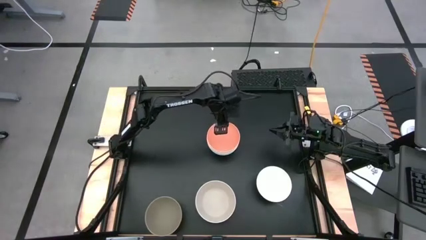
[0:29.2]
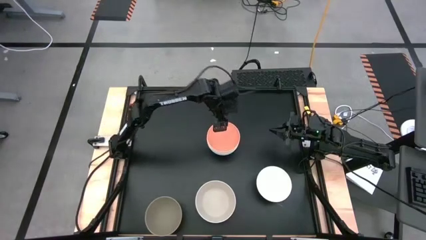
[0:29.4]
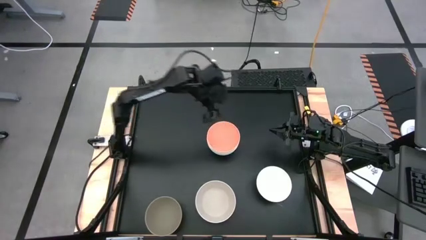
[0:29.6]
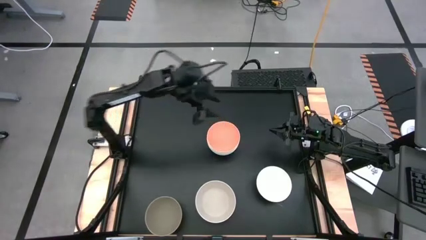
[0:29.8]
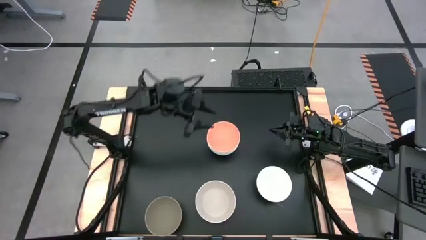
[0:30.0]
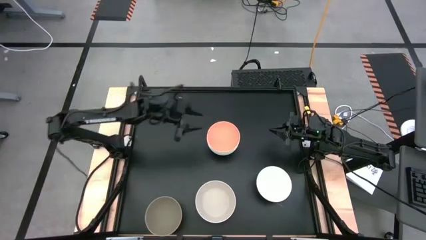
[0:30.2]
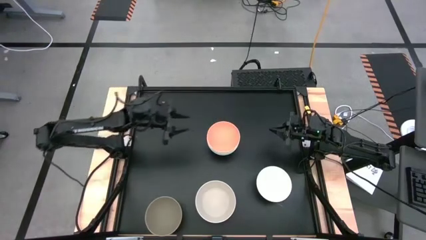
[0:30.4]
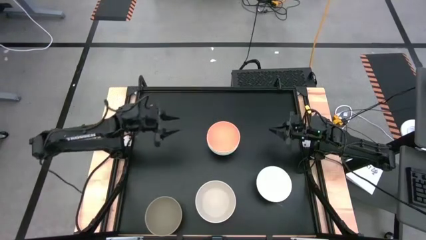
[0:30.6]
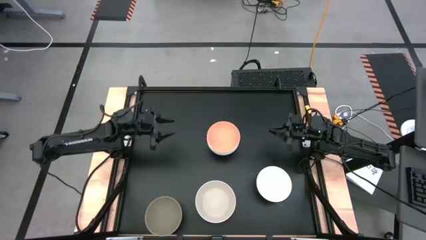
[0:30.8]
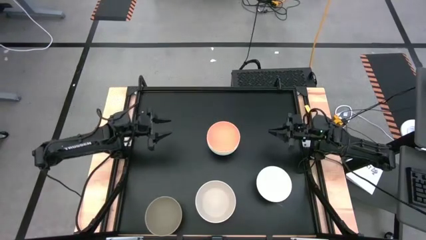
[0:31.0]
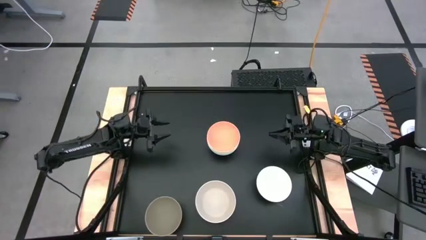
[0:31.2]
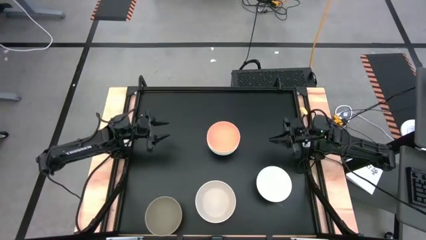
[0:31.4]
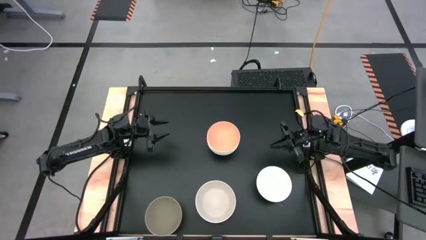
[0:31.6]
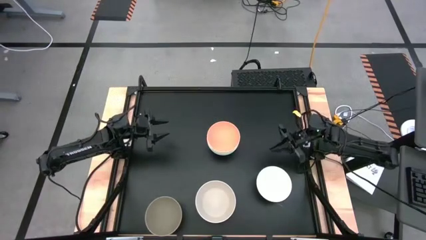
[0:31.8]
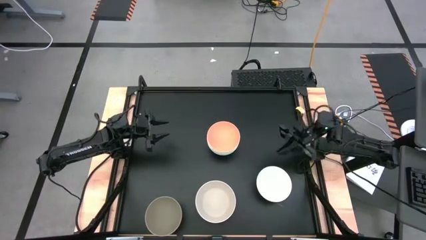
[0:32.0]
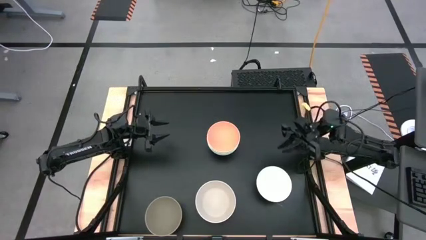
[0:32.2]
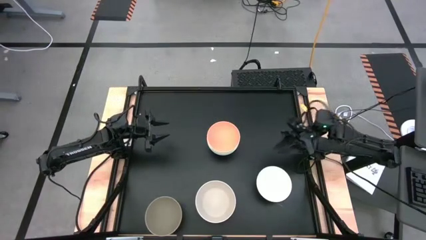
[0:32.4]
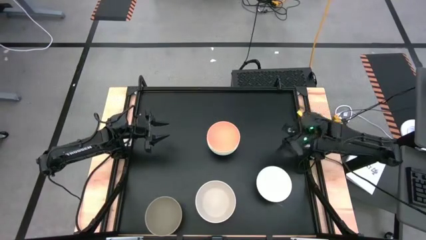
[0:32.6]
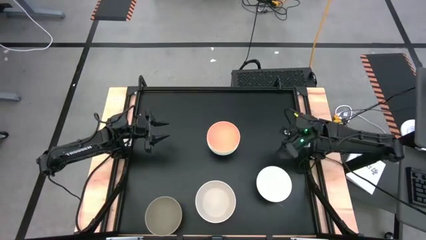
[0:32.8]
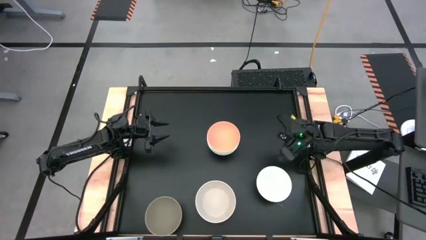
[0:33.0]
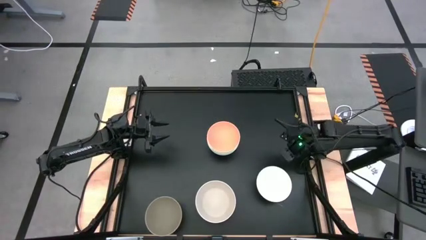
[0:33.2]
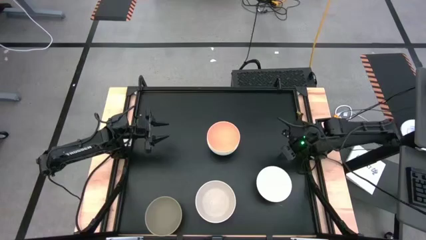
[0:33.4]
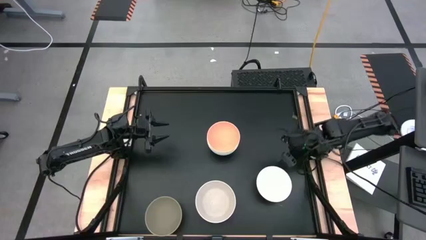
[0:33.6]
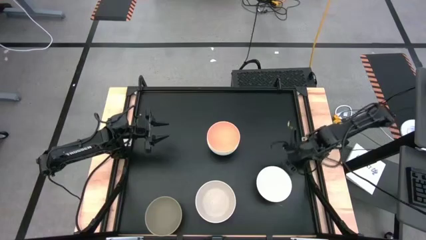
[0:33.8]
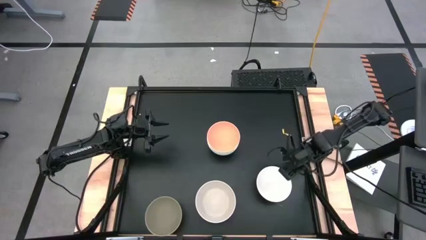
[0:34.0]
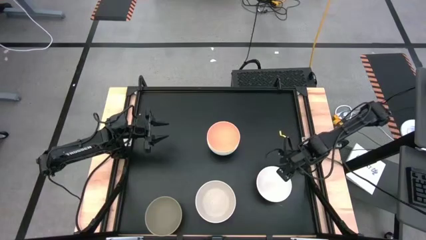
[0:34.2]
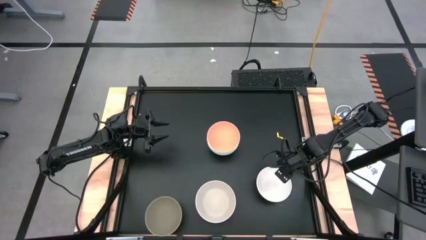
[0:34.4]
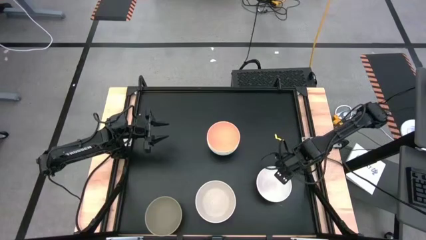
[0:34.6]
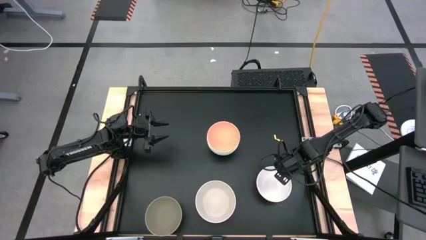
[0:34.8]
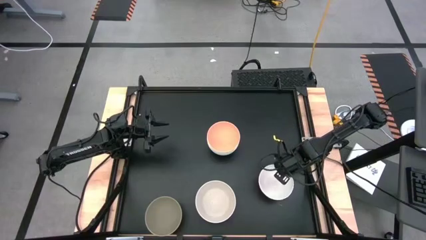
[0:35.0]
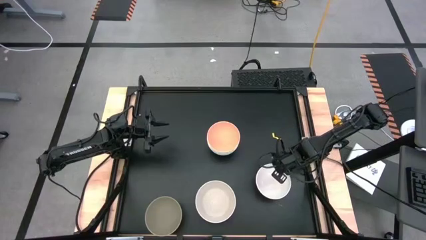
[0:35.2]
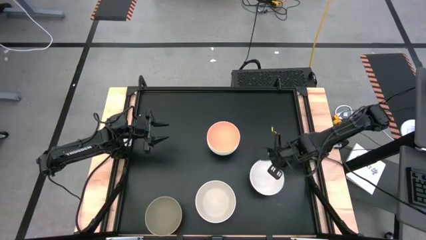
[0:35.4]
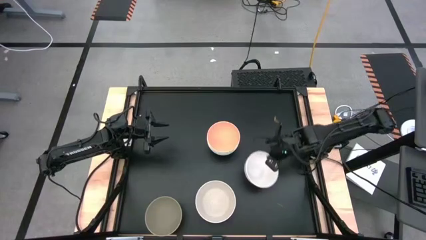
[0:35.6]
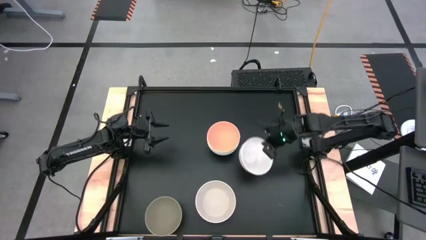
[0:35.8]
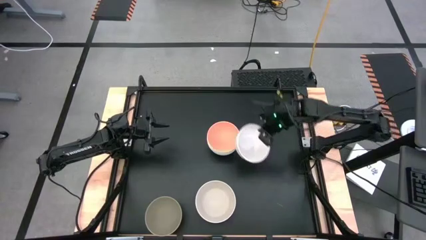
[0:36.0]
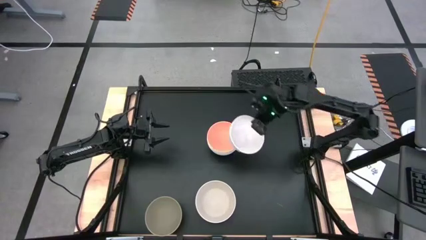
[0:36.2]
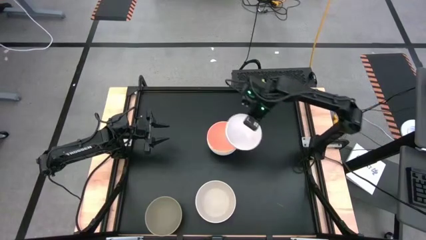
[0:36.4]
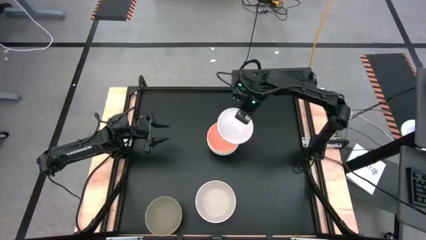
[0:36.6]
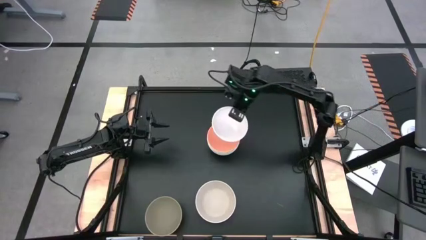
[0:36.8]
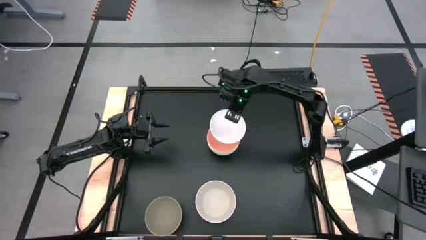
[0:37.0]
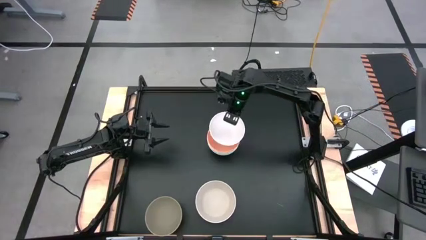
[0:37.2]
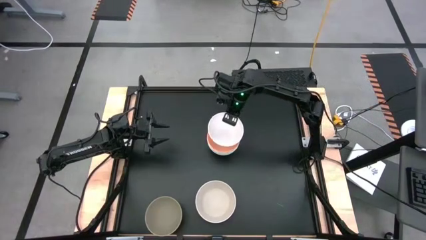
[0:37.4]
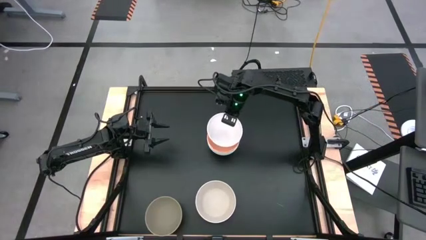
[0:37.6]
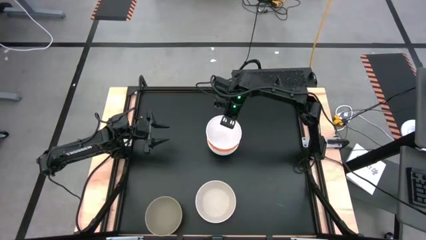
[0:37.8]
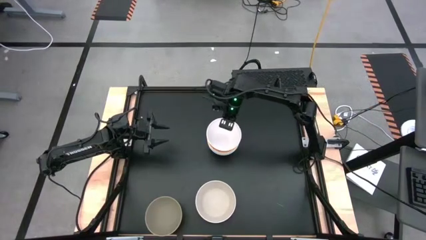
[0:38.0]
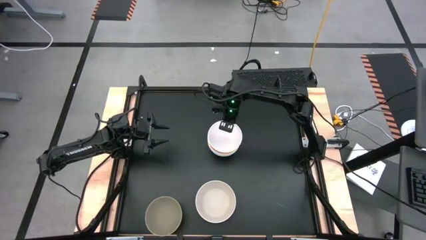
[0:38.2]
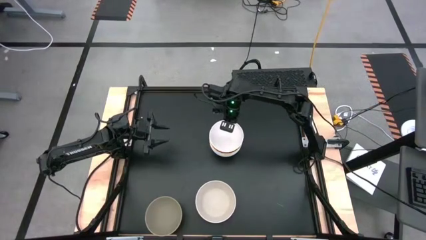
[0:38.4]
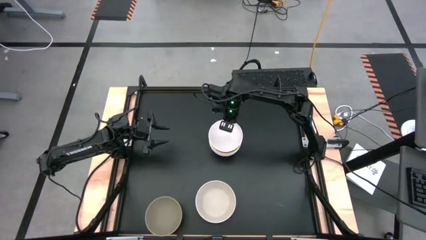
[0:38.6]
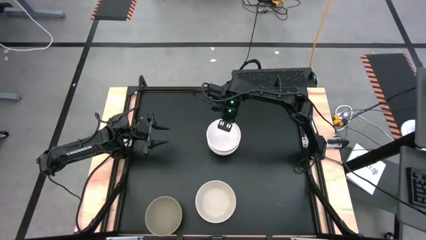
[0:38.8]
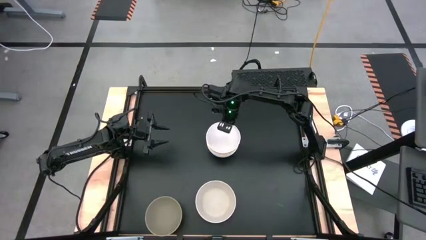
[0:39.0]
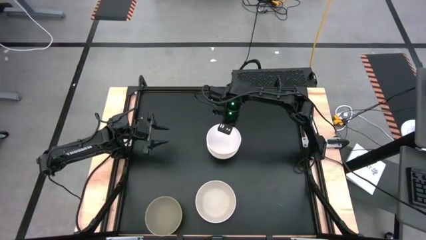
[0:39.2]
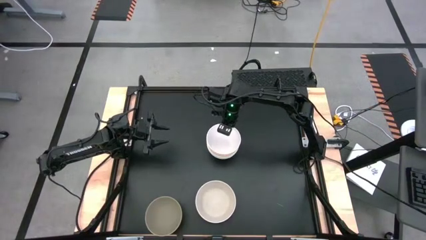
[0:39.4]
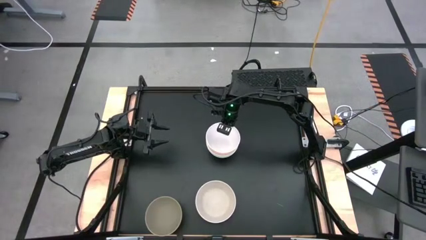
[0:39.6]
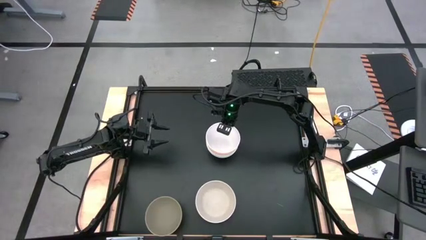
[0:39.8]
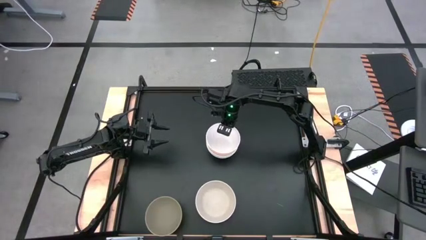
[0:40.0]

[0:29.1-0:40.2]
Task: Nest bowls inside each other
Stack the white bowl on the pink bowl

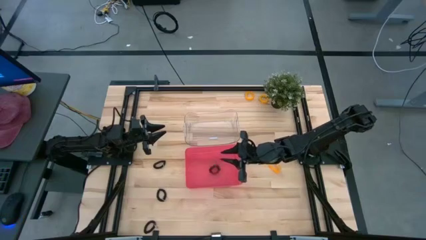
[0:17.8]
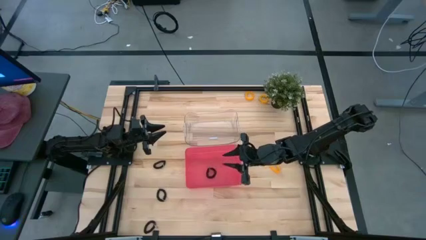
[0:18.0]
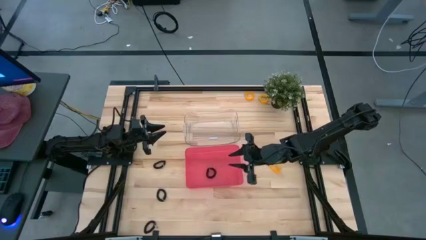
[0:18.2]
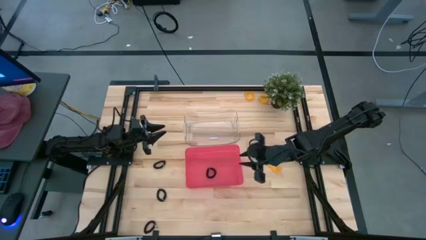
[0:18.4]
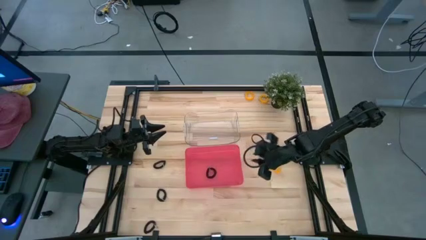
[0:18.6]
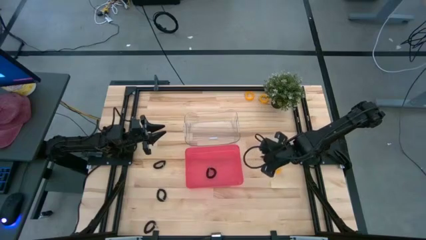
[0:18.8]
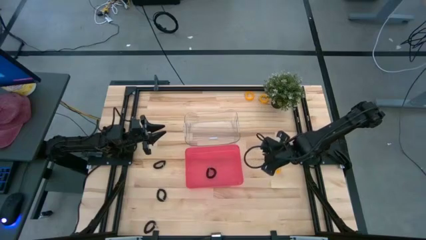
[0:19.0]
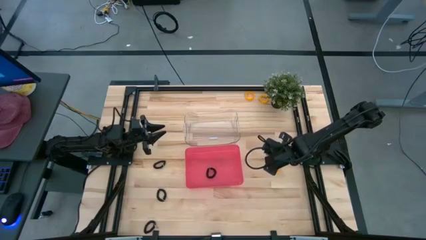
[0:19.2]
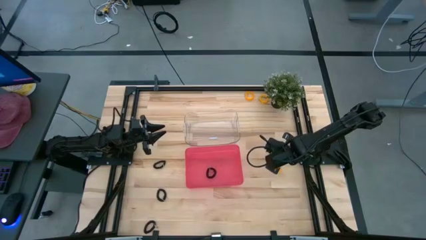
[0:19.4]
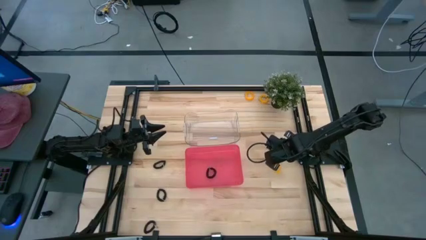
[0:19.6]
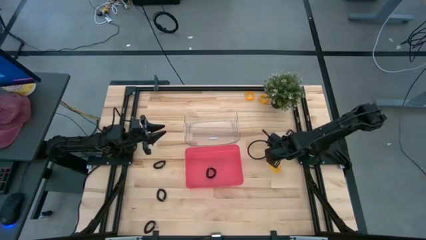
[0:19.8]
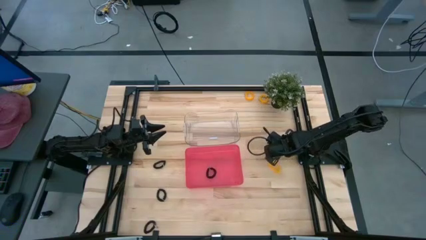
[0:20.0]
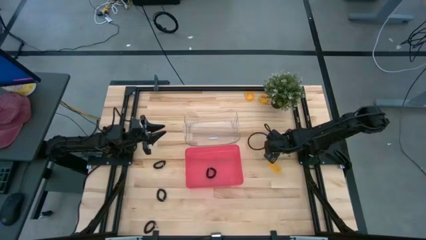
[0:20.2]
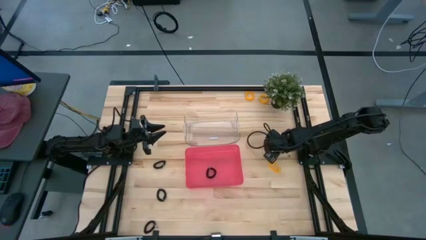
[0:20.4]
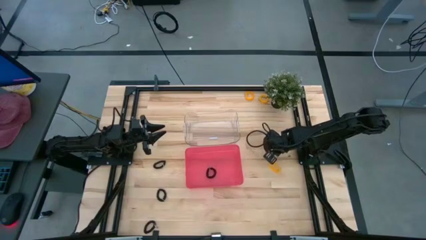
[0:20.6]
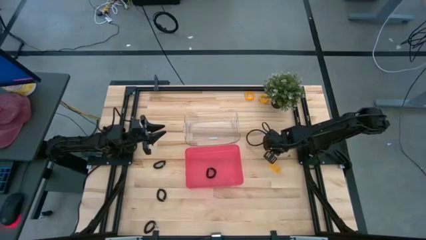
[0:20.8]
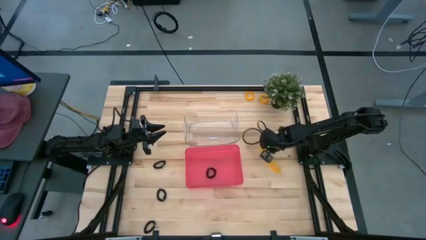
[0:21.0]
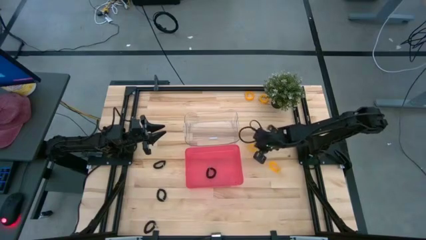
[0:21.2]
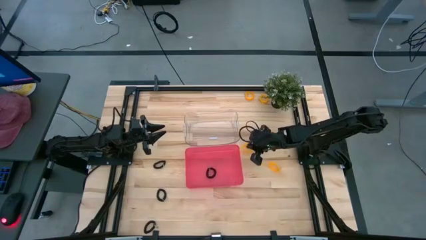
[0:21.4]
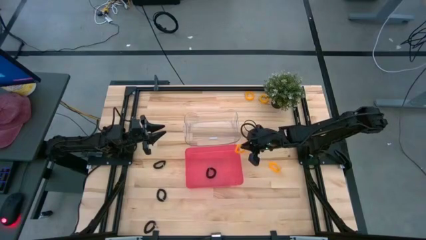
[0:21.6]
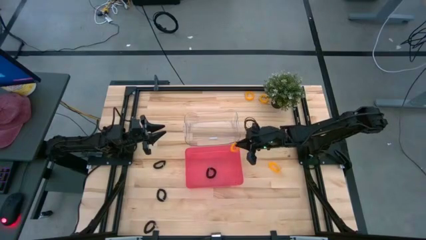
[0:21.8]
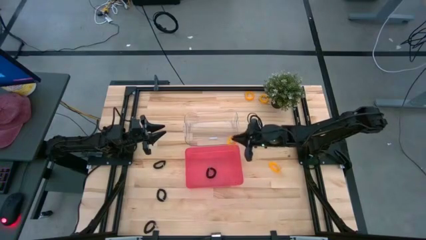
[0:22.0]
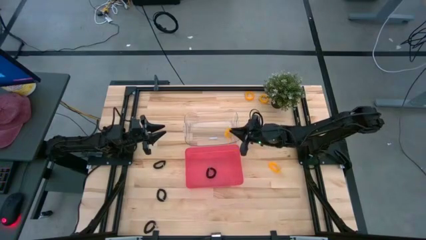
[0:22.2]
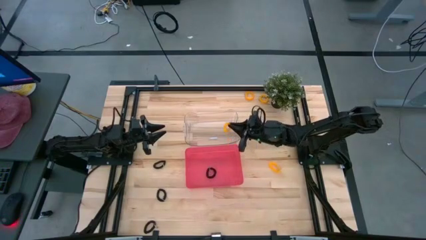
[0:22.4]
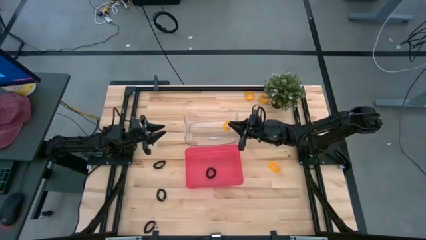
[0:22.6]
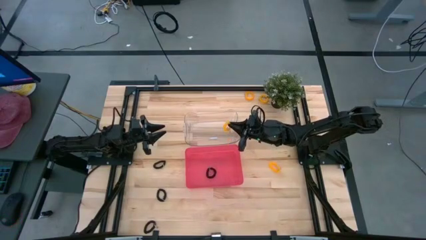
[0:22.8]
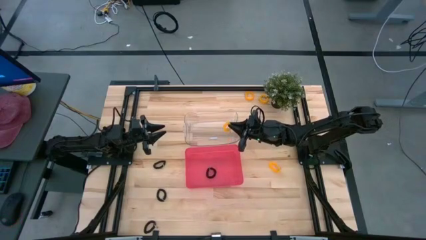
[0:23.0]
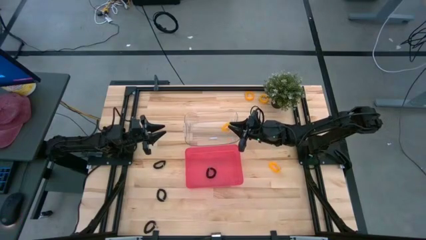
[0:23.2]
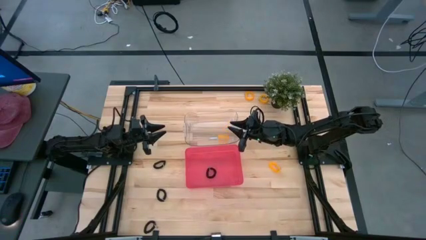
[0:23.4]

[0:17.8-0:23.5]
Task: Sort spring keychains
Put the yellow spring keychain into the transparent bin
